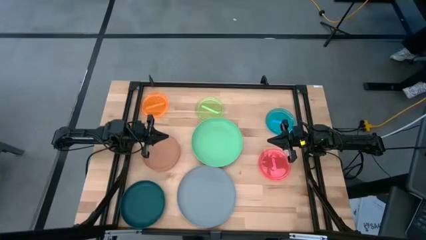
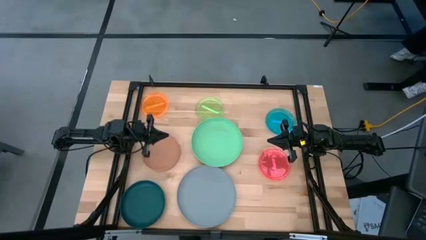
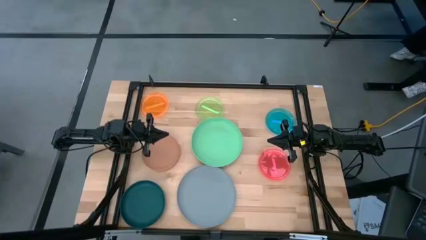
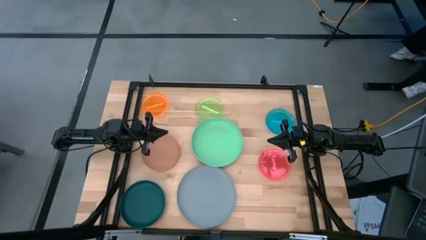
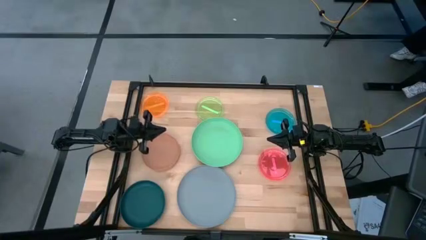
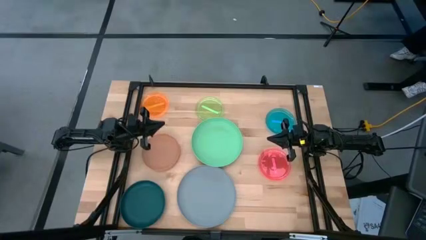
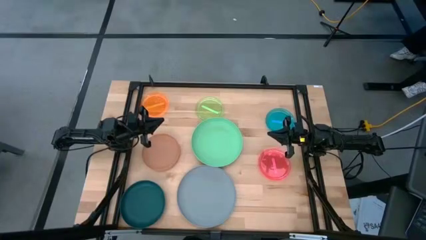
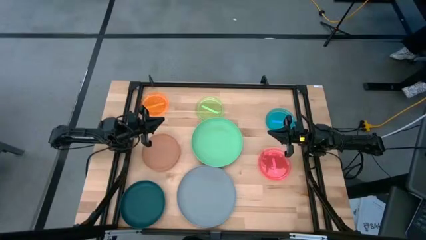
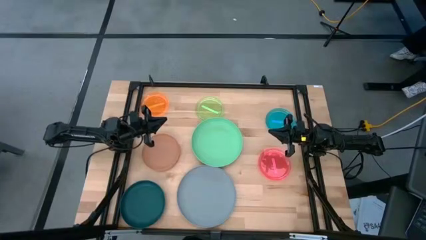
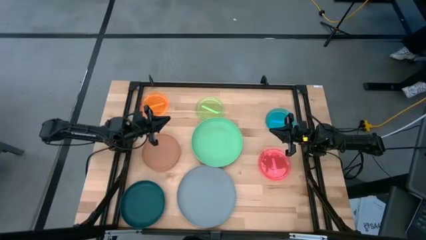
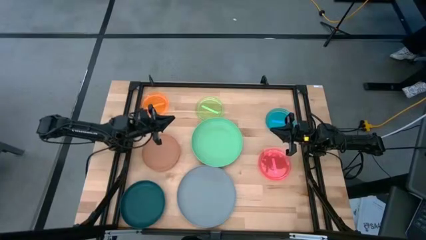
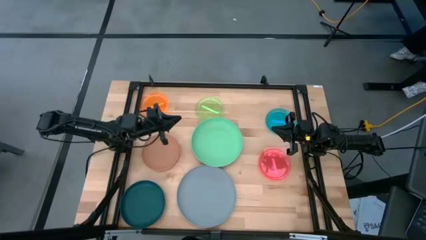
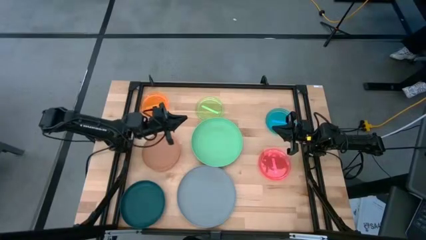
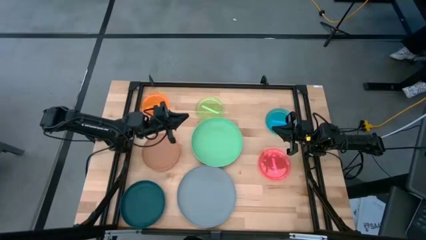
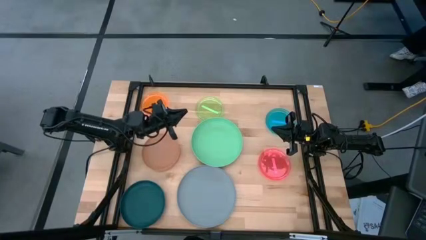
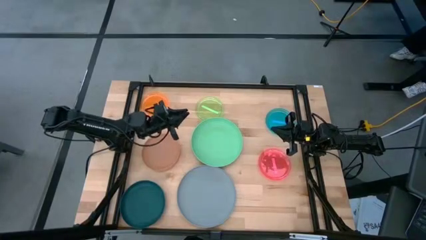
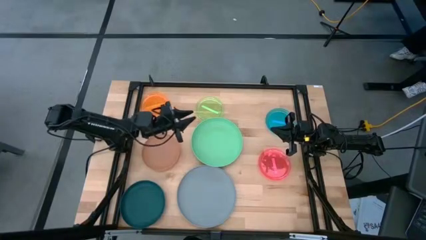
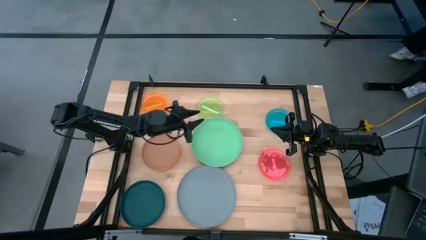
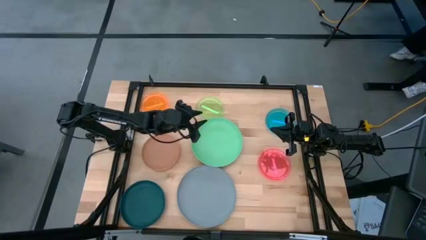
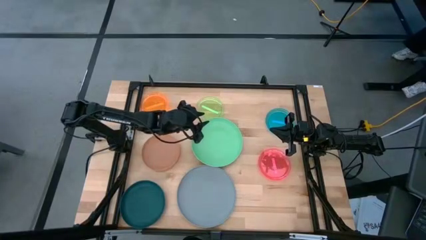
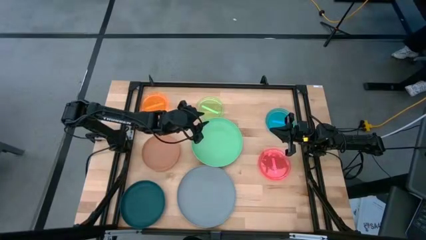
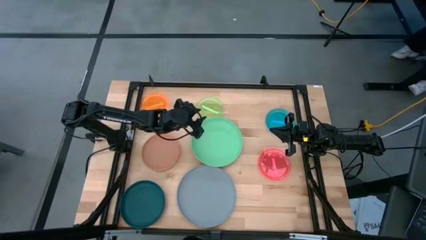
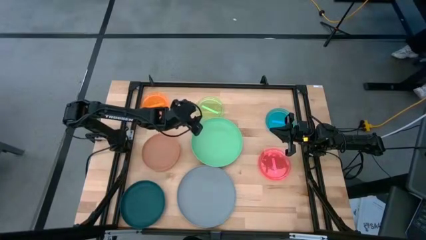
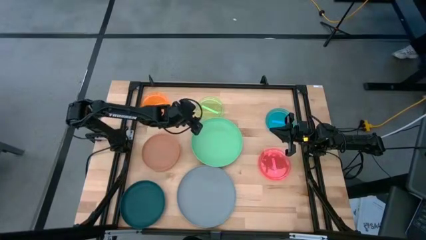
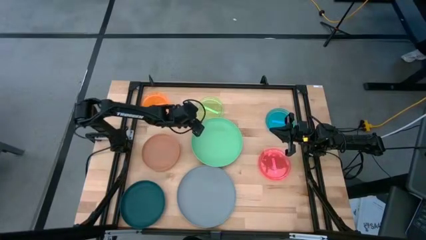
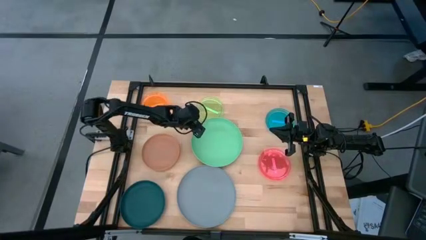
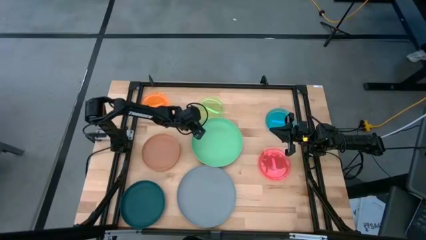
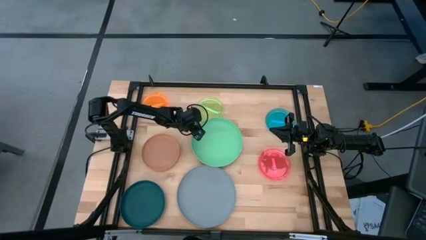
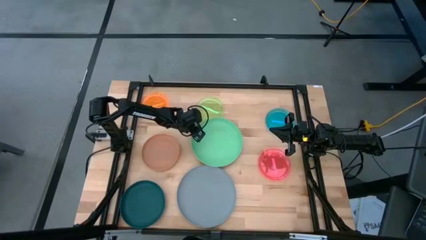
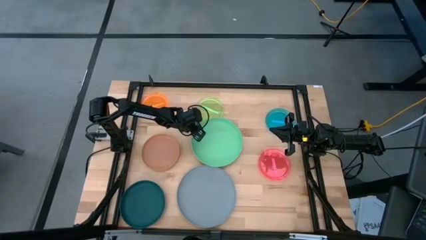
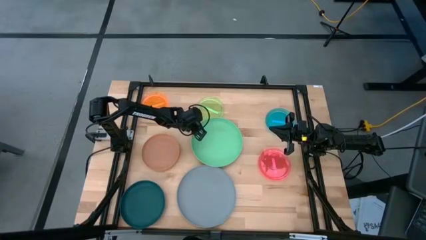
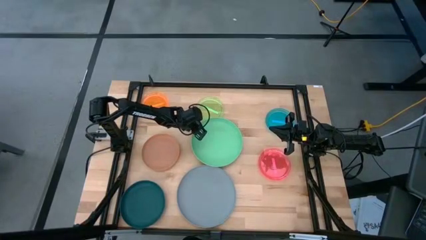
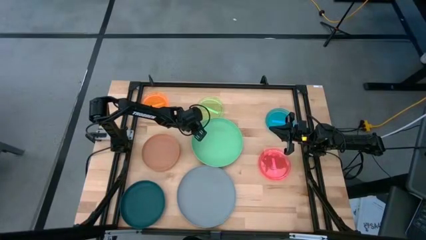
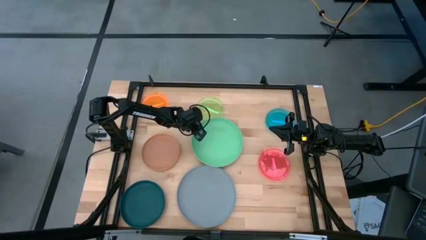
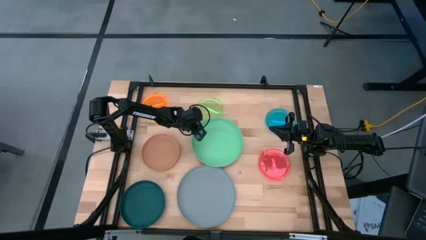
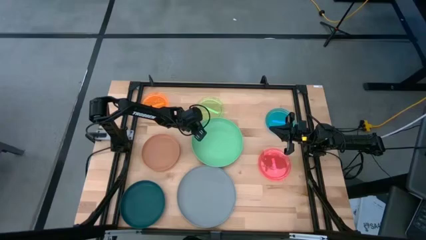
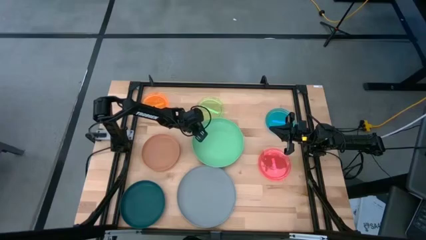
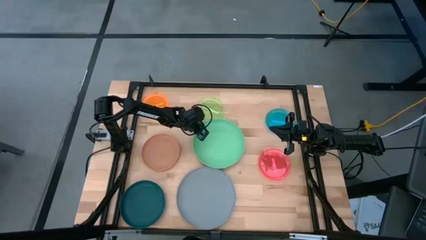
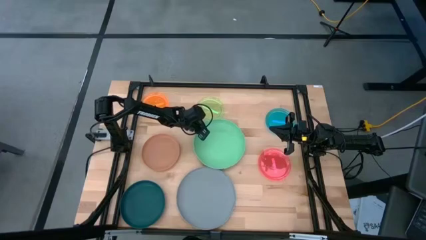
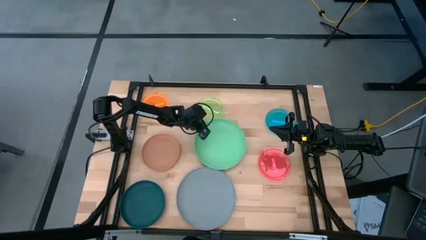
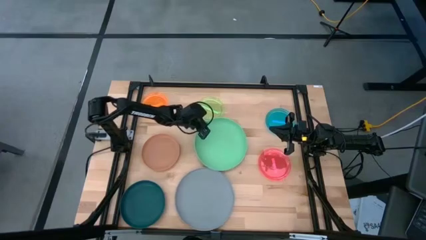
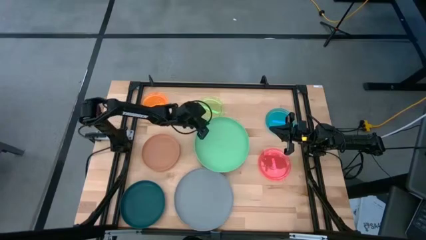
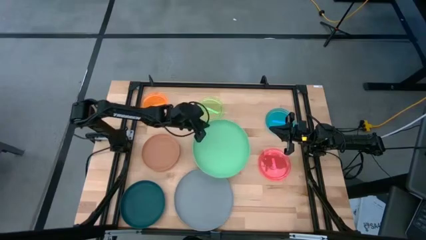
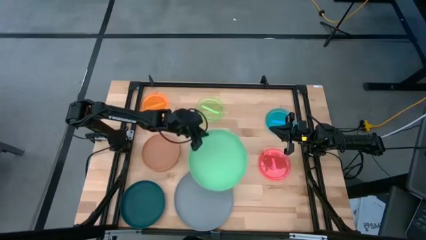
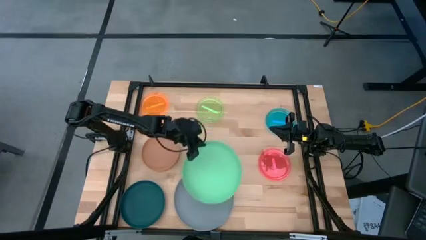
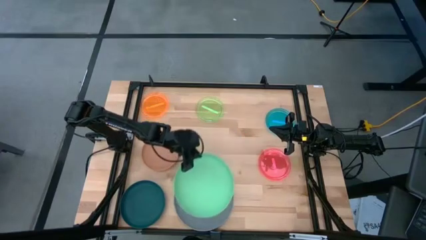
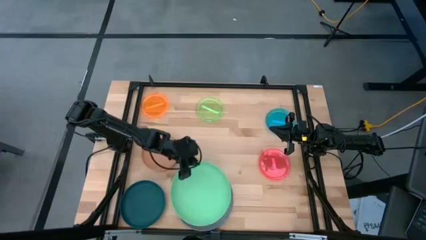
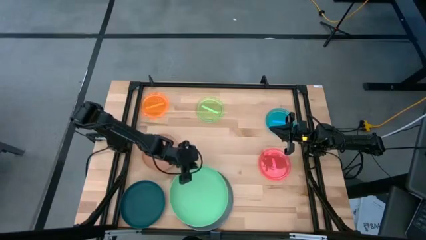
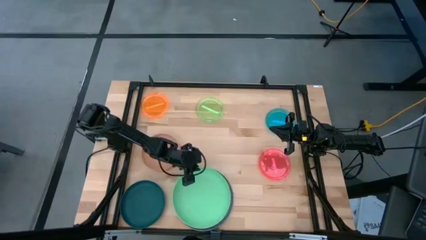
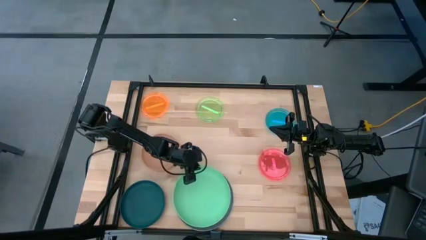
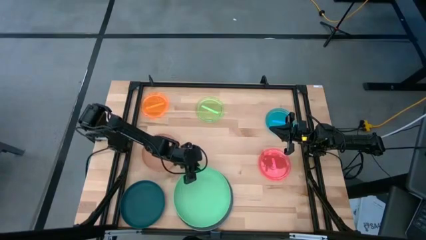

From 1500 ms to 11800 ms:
Task: Stack plastic plates
Stack the green plate on top of the gray plate

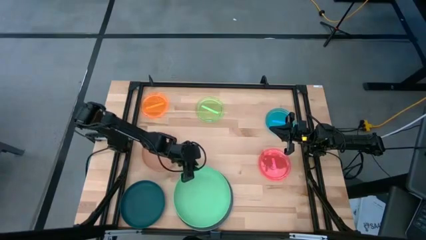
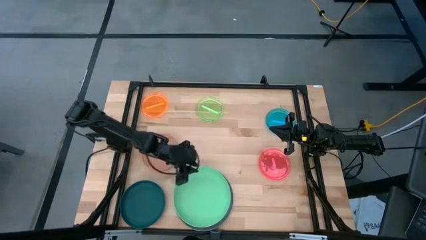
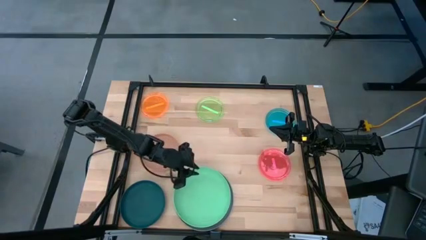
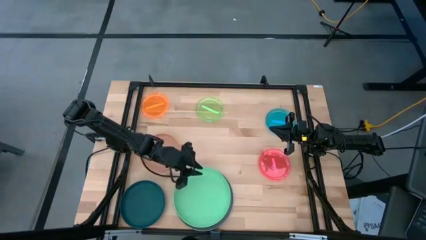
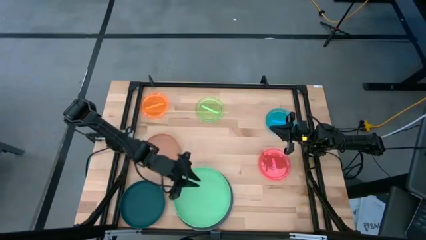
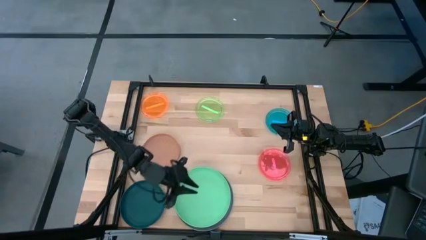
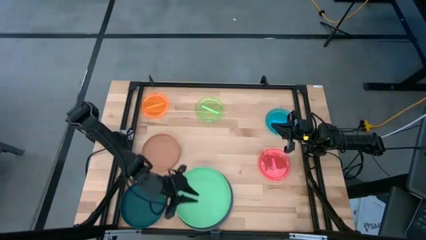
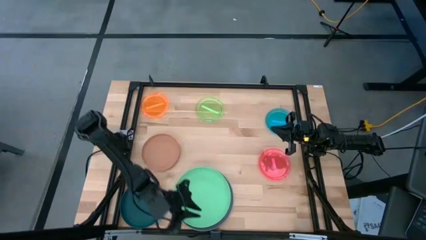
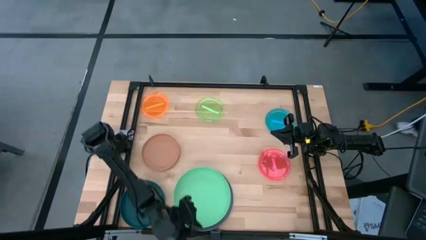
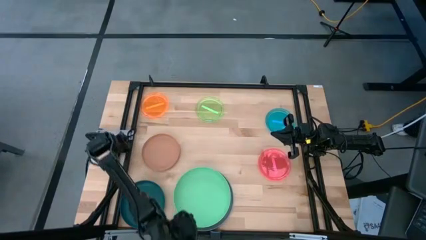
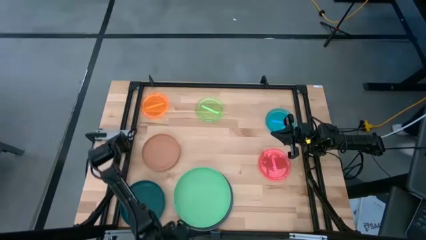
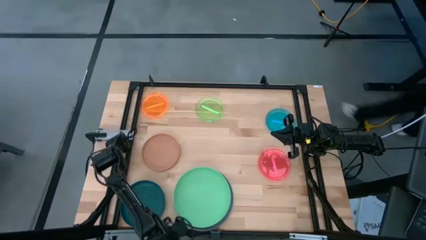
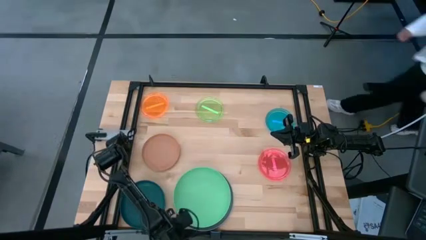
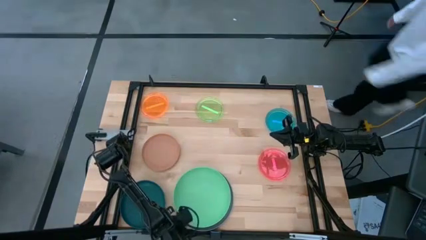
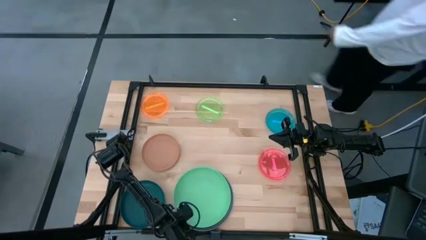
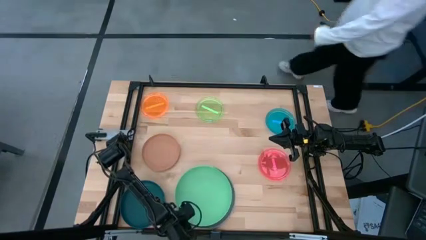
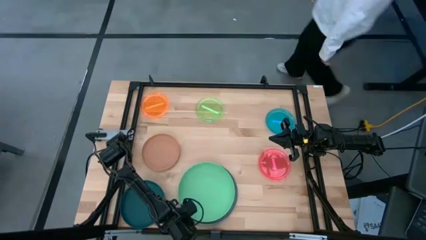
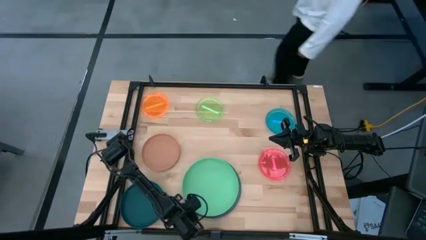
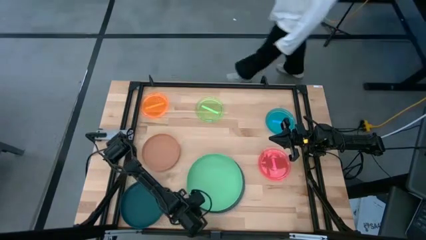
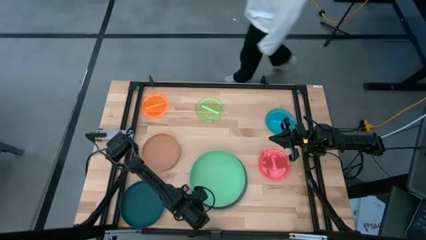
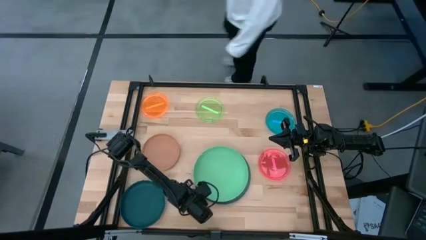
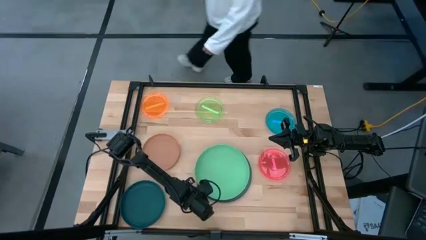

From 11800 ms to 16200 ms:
Move the stacked plates to the center of the table

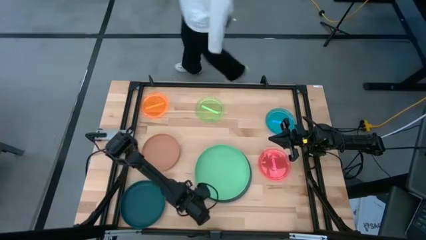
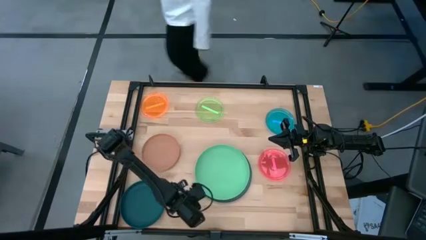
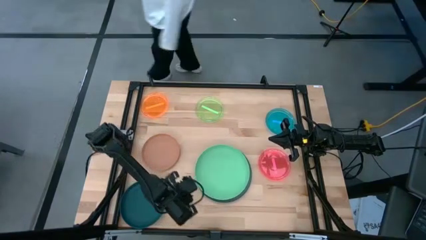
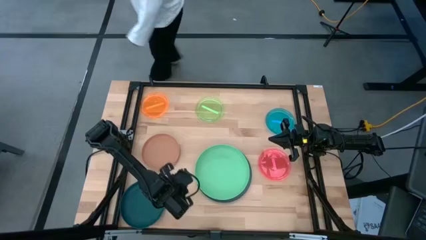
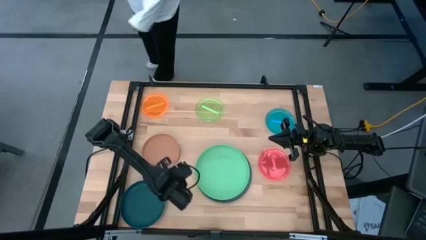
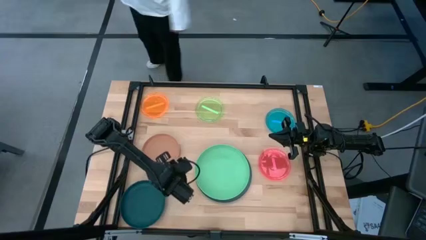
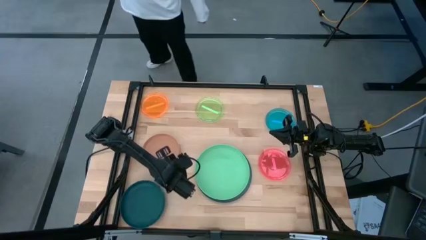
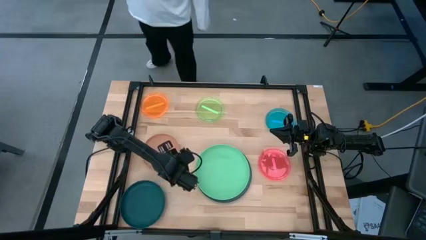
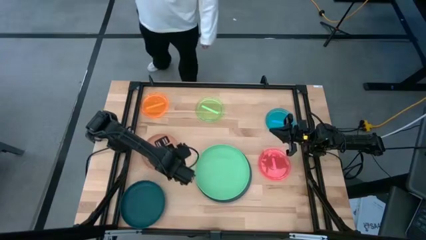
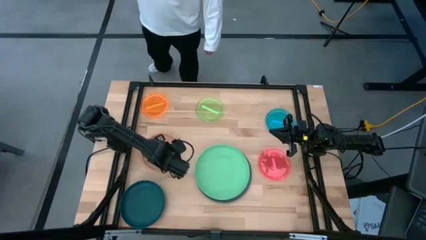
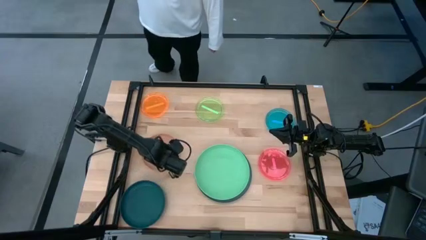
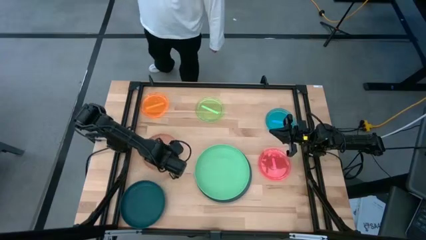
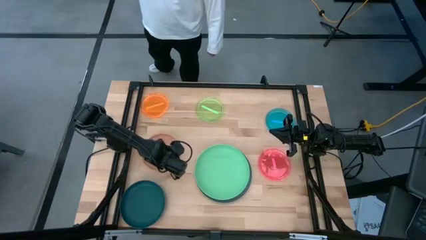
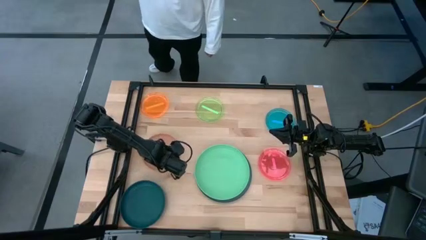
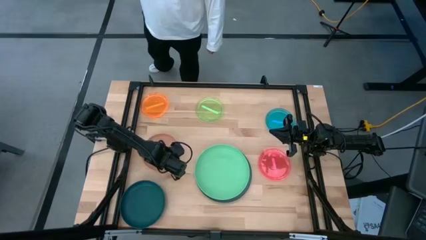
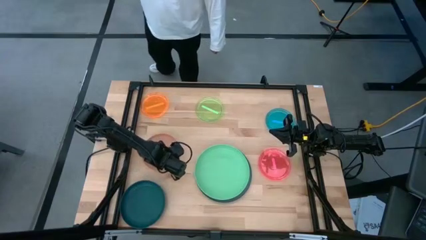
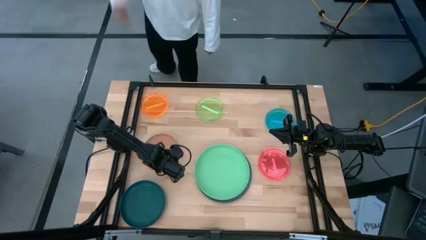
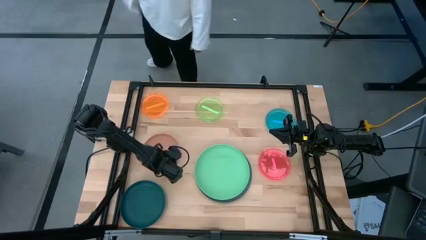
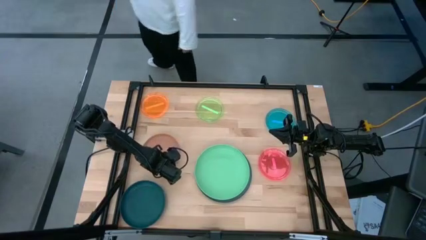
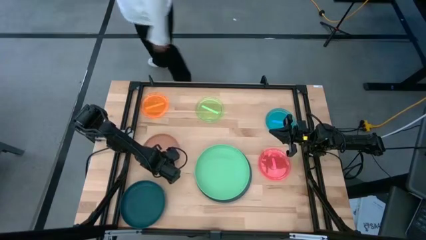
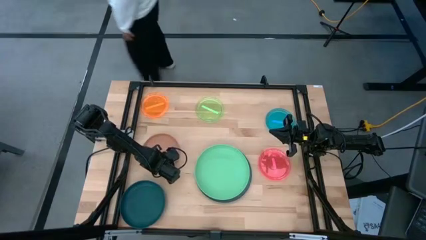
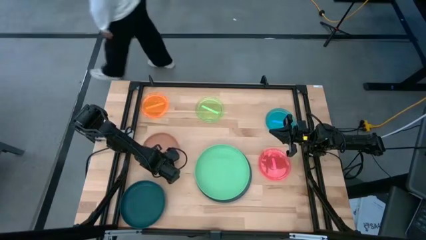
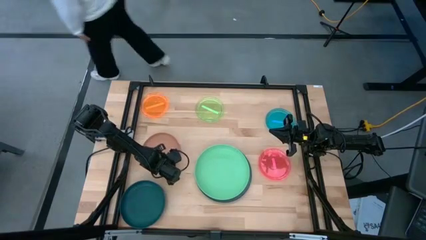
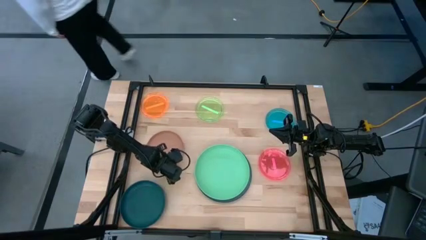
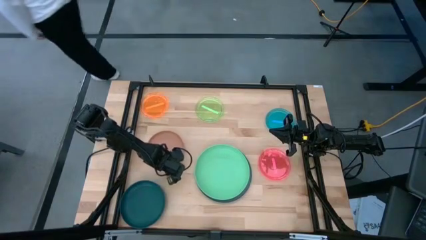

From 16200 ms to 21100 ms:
Stack the dark blue plate on top of the light green plate
